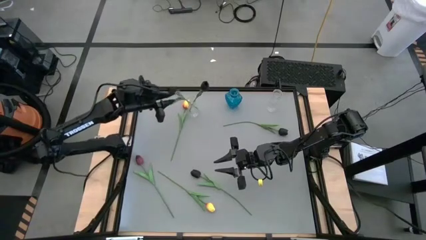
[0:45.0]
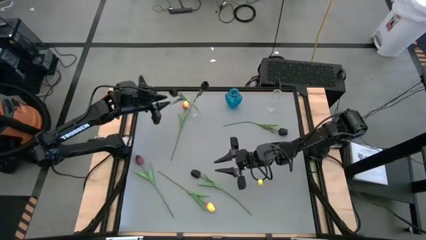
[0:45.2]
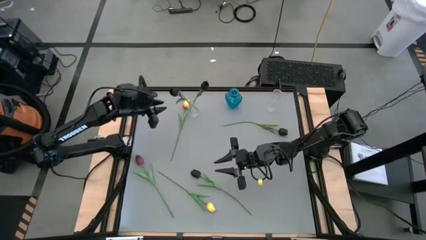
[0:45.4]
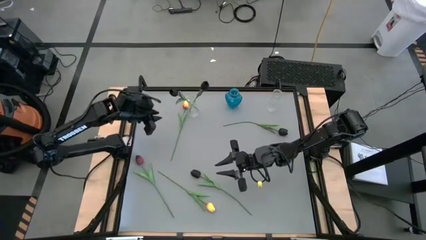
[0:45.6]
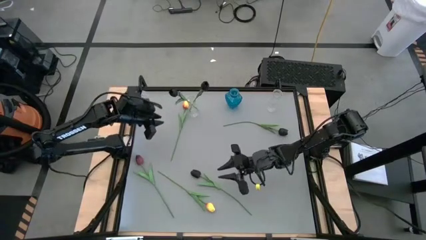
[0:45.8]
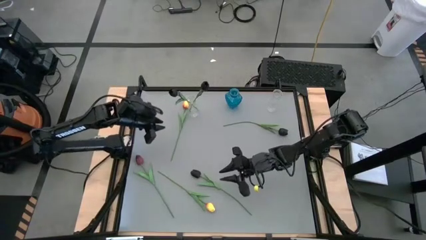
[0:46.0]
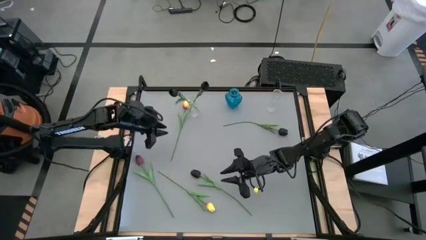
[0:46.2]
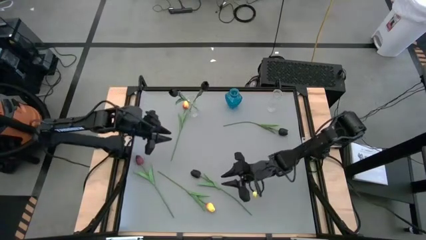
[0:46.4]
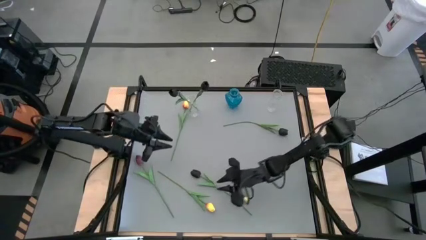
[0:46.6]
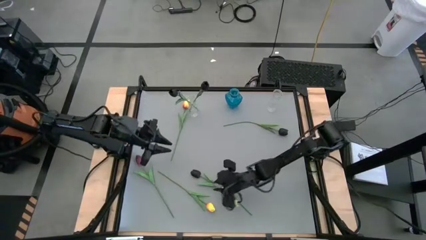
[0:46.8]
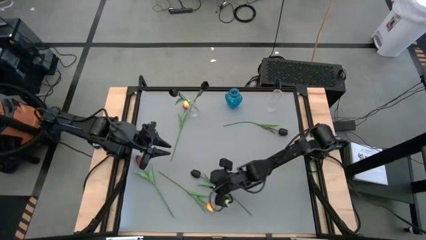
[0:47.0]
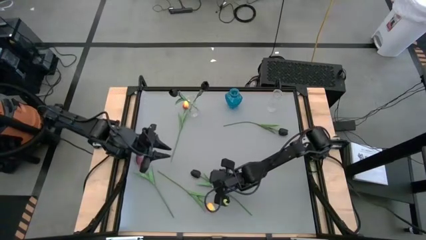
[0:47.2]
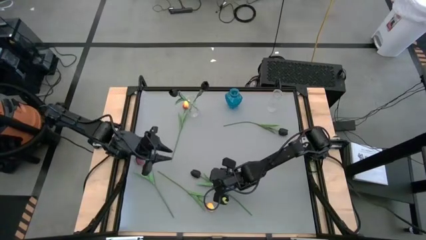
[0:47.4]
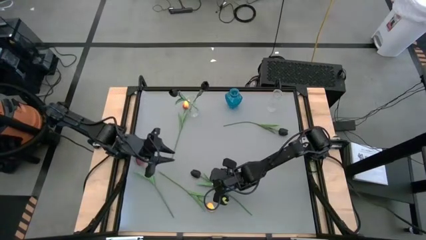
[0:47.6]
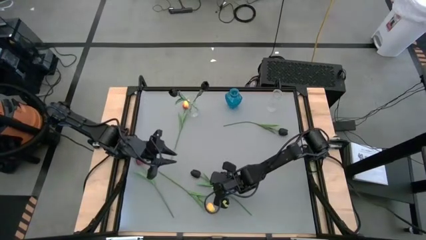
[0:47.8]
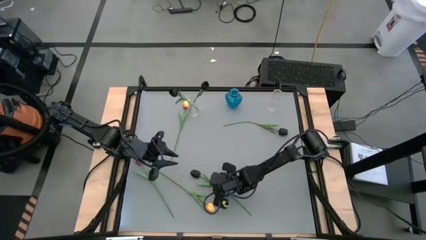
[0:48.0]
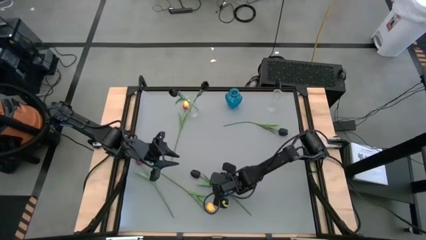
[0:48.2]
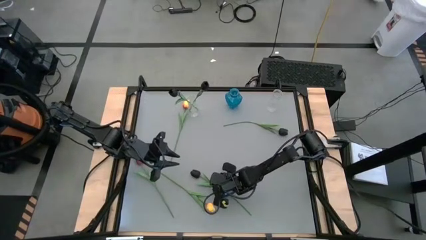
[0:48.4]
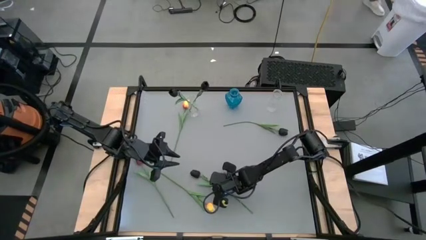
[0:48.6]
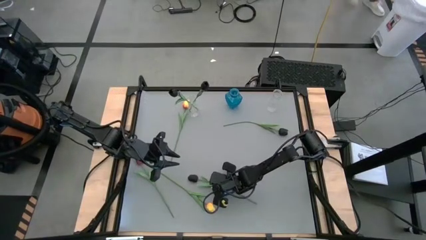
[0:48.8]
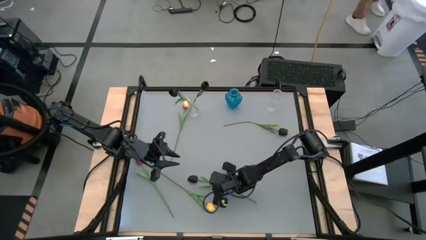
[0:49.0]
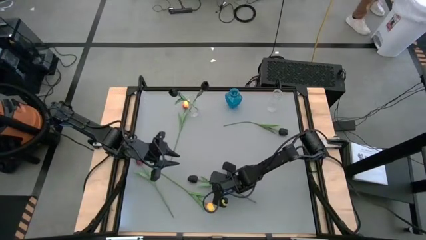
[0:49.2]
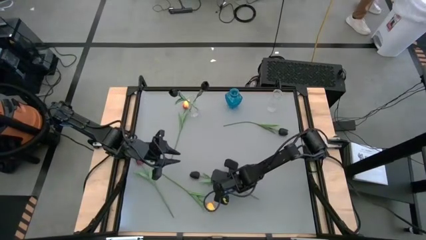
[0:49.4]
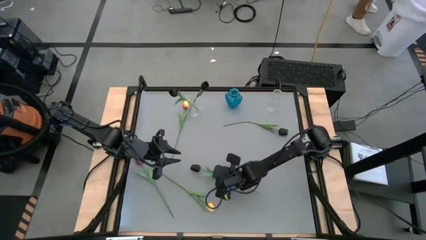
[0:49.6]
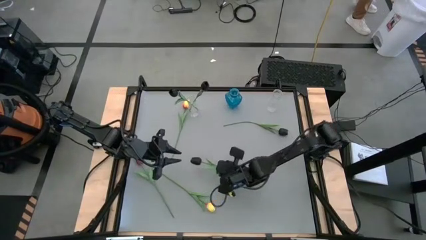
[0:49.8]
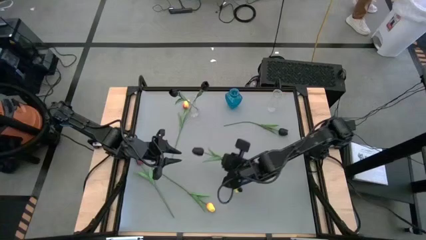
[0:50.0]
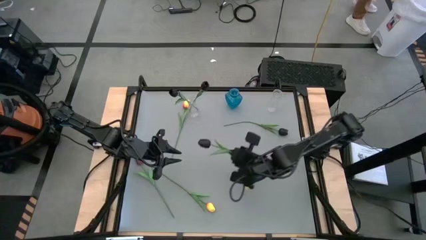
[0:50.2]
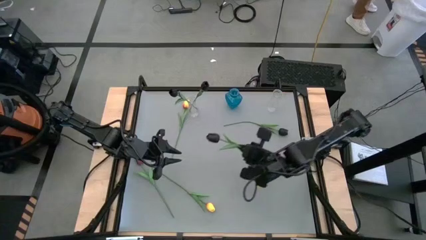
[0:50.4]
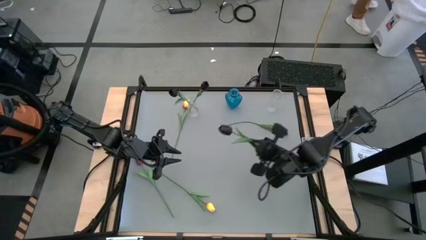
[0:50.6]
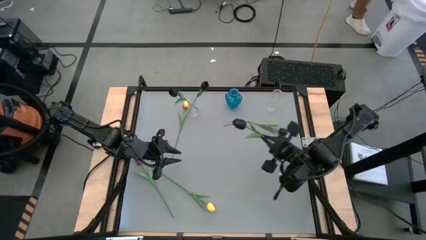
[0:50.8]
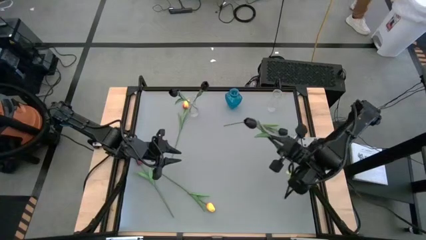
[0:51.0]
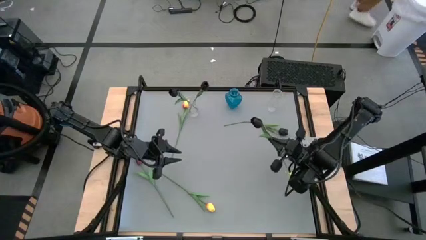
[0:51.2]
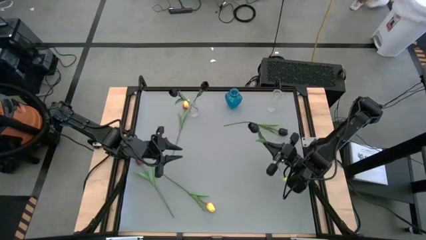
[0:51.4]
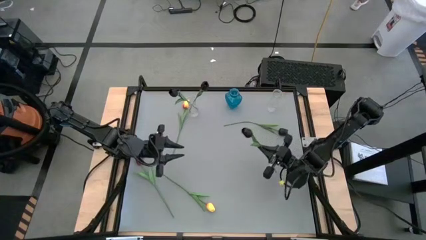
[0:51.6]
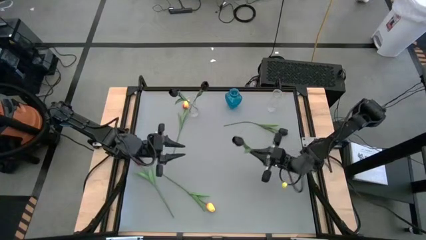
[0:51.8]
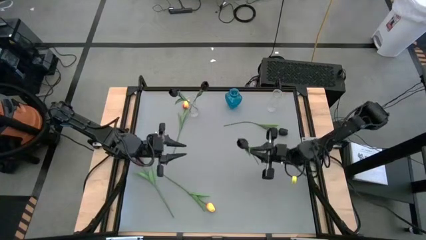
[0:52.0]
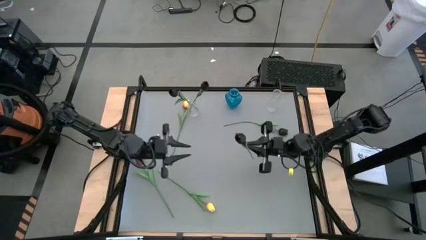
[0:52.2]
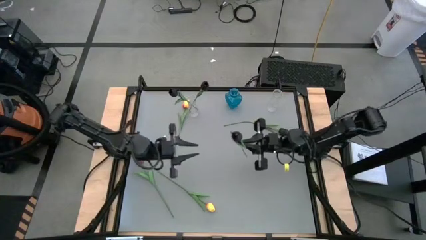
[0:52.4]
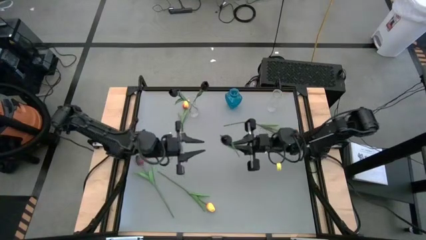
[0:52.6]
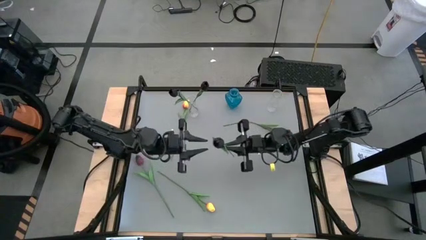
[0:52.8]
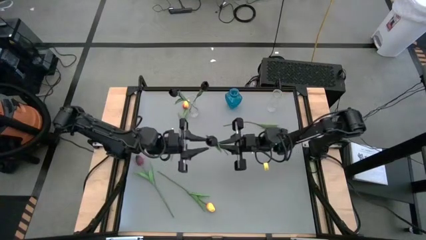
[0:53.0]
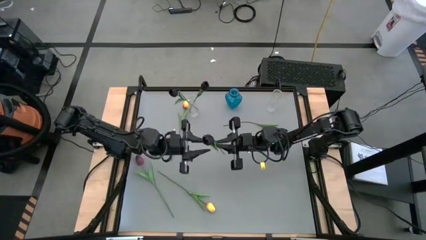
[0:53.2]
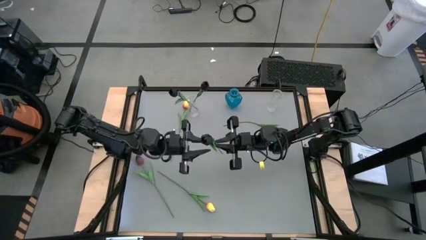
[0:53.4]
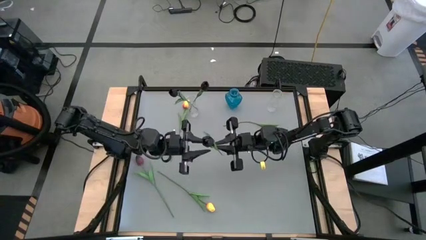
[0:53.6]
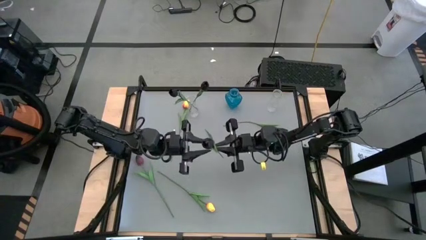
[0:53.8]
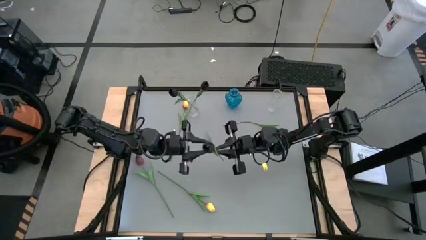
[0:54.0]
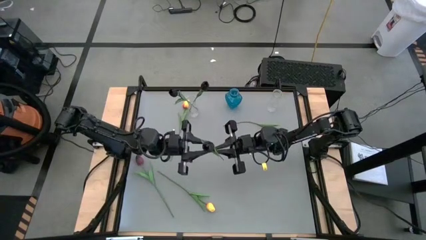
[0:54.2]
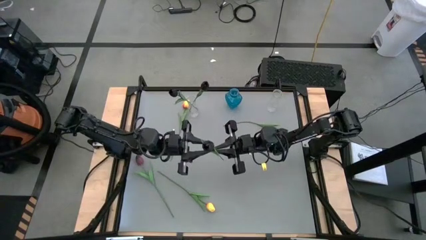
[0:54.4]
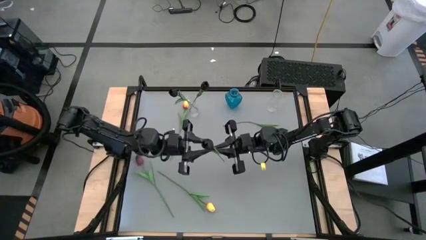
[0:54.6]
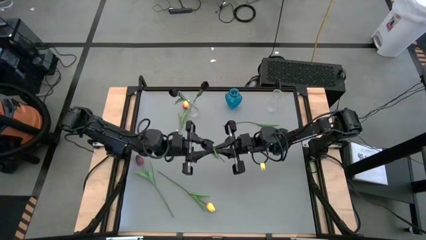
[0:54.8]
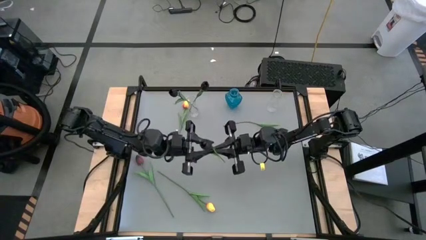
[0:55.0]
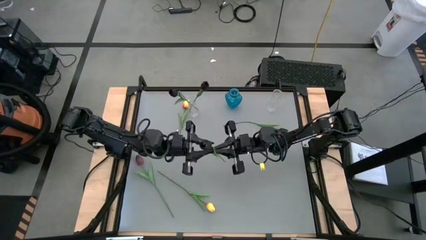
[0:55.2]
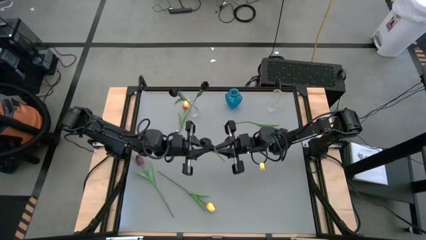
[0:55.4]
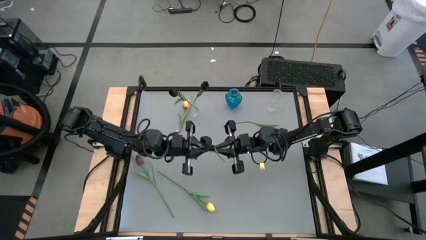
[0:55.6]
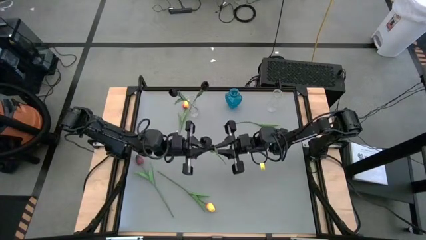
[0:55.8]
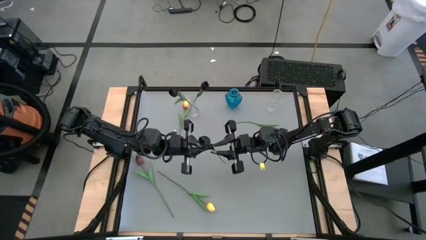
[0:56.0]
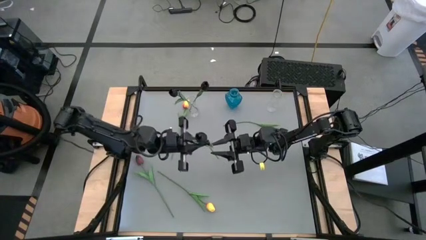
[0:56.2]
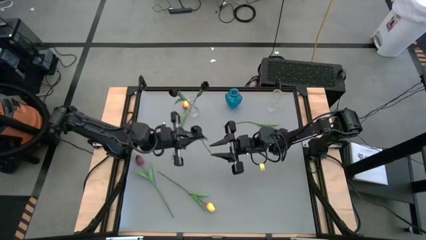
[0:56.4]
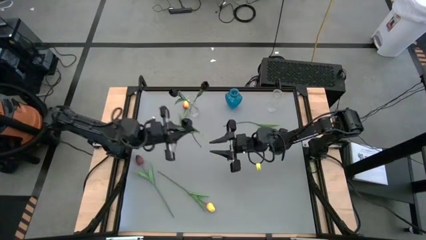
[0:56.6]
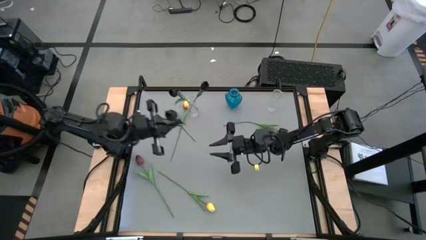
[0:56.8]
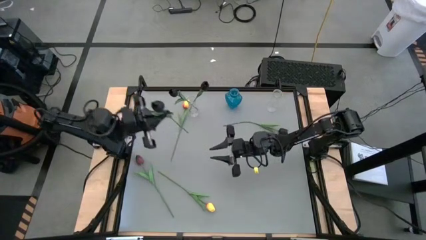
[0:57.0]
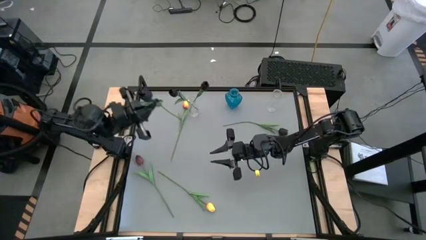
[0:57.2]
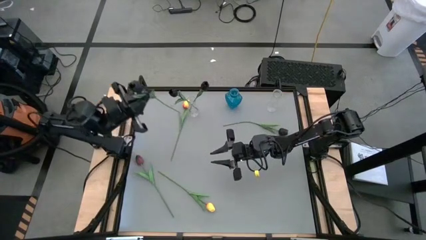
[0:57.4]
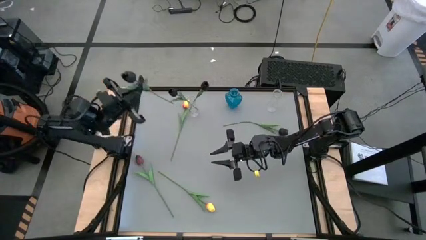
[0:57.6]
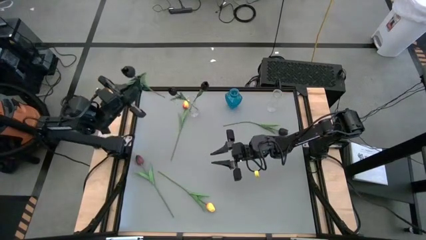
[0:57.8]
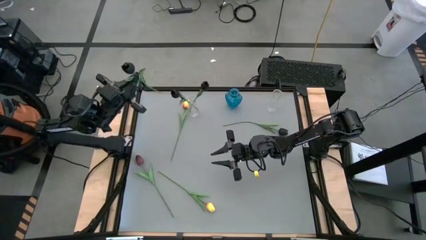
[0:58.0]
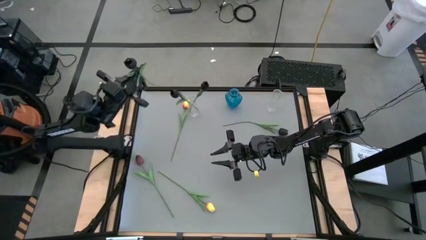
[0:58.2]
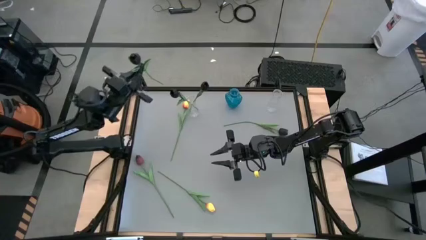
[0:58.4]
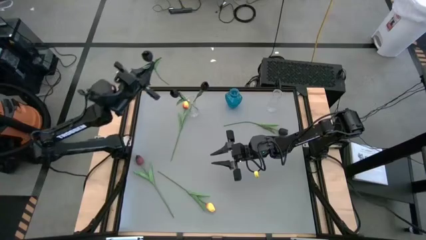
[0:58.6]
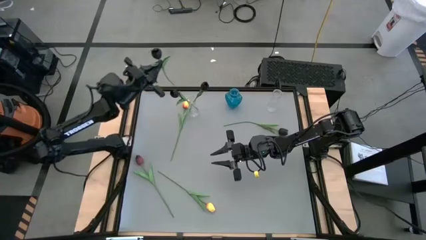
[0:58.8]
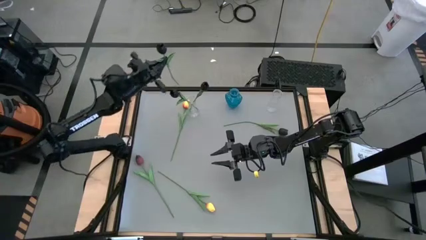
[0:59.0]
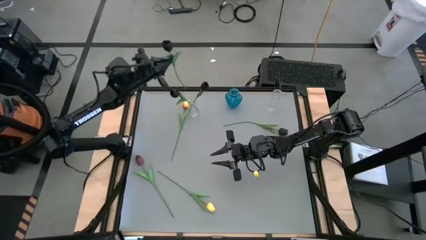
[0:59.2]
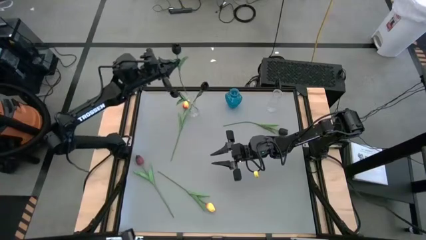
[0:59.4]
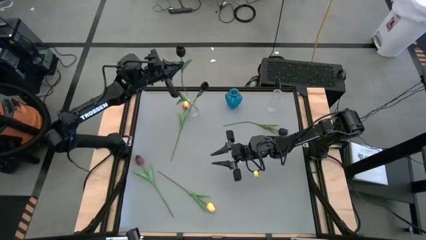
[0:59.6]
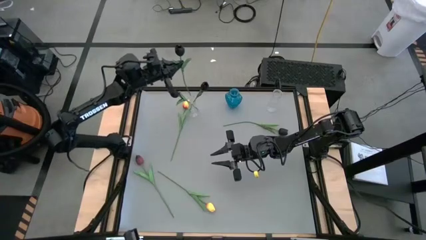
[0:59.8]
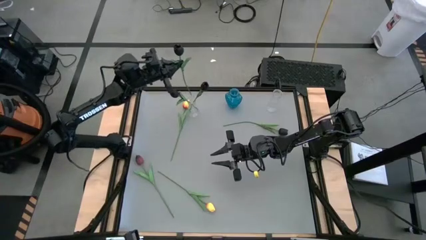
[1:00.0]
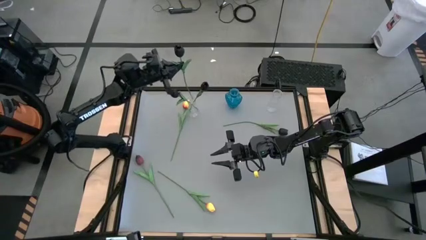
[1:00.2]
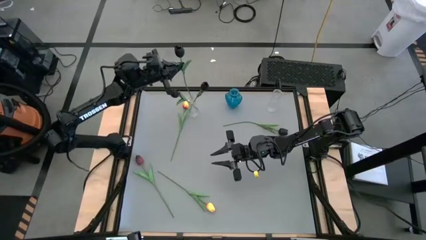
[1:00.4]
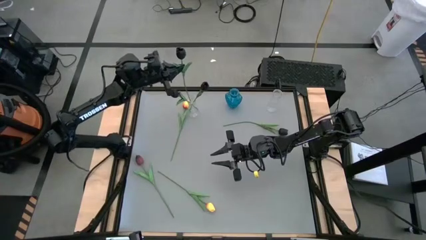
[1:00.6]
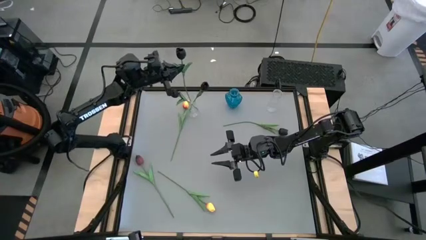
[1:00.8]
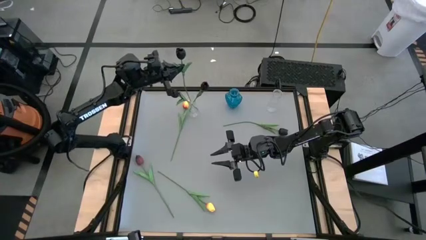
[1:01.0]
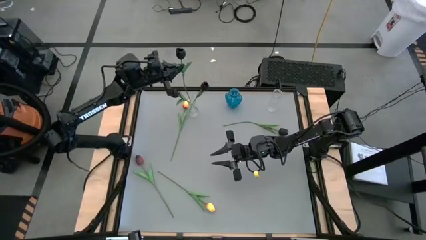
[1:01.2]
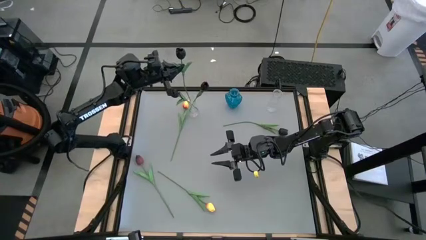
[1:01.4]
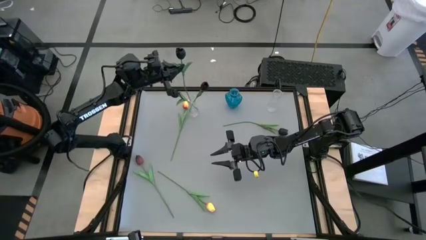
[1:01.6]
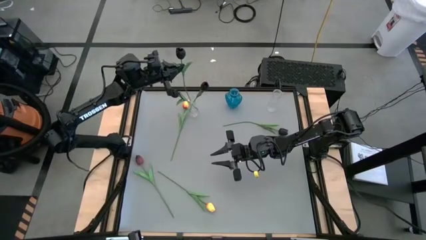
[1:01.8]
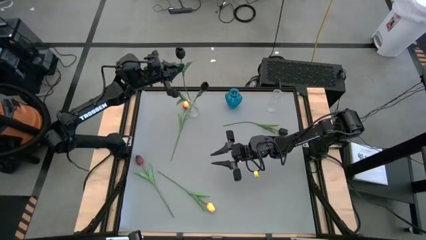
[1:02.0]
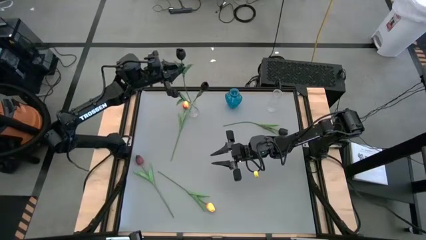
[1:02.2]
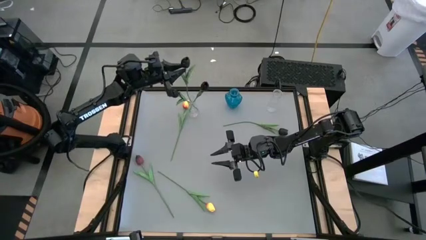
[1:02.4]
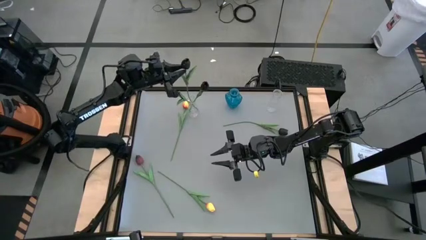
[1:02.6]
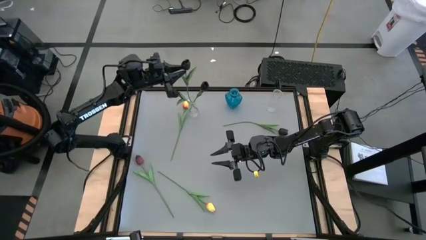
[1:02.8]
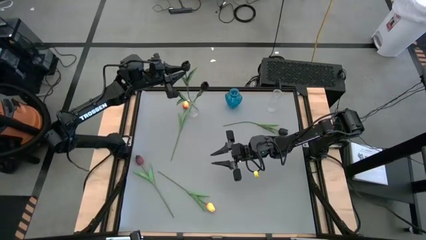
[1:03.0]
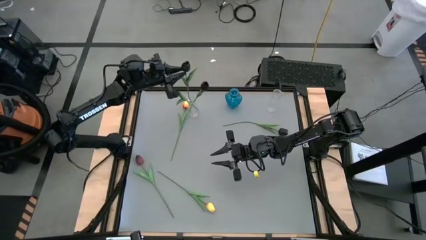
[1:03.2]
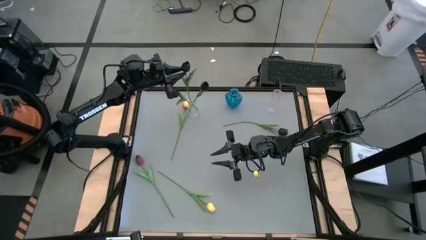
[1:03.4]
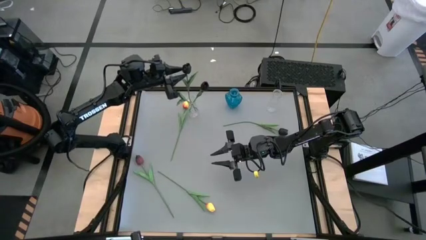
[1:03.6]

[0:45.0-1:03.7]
Task: Sort flowers into vase by color
Put the black flower into the left transparent flower vase
